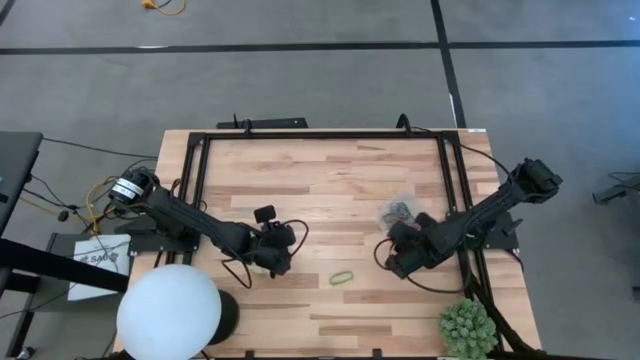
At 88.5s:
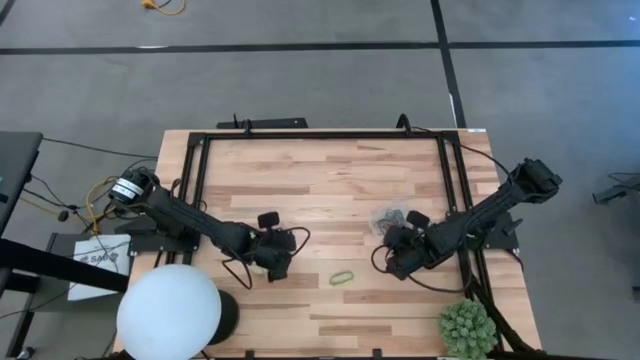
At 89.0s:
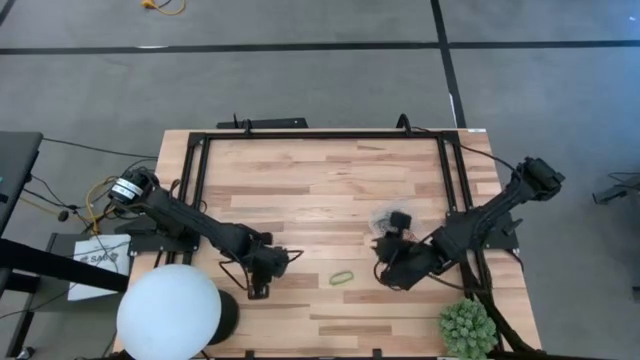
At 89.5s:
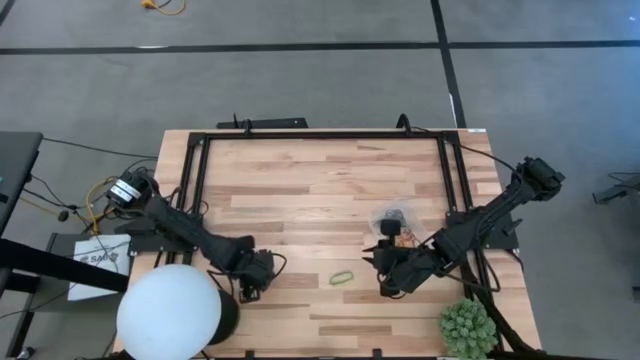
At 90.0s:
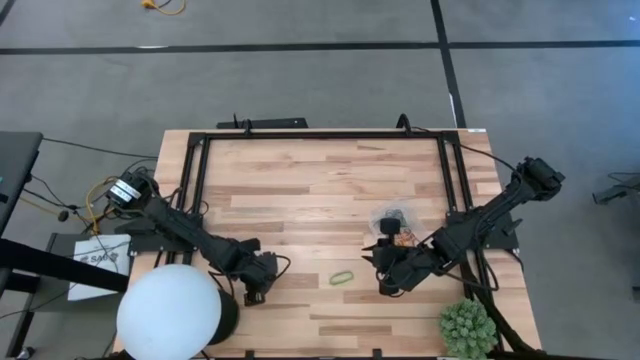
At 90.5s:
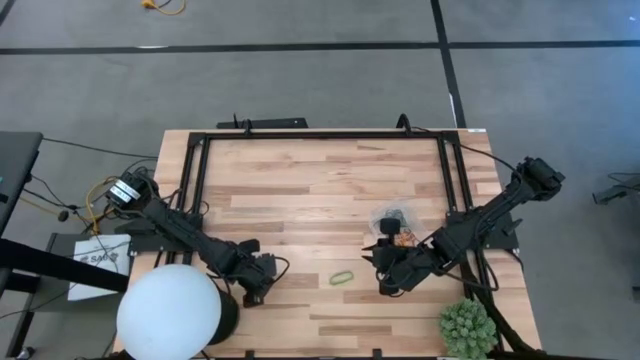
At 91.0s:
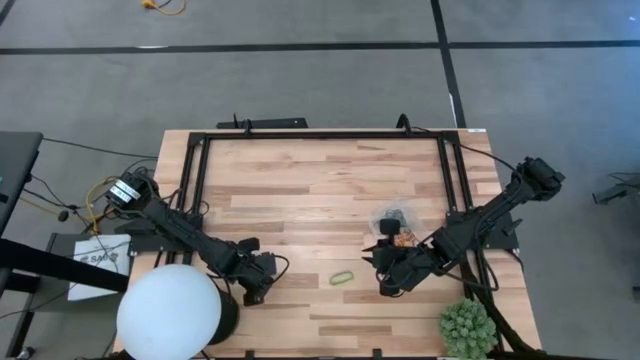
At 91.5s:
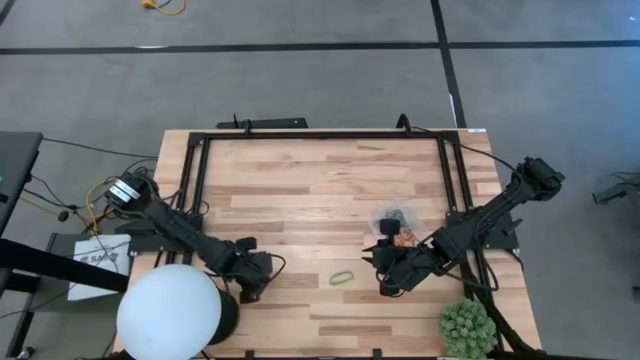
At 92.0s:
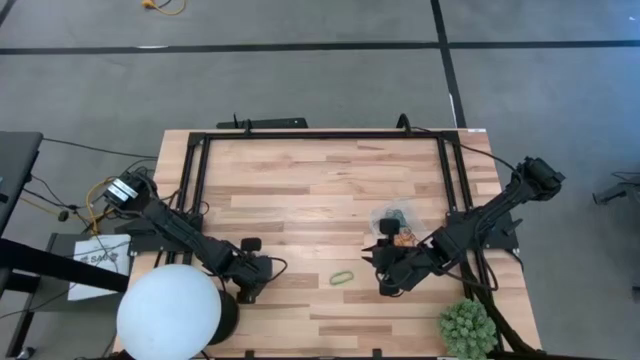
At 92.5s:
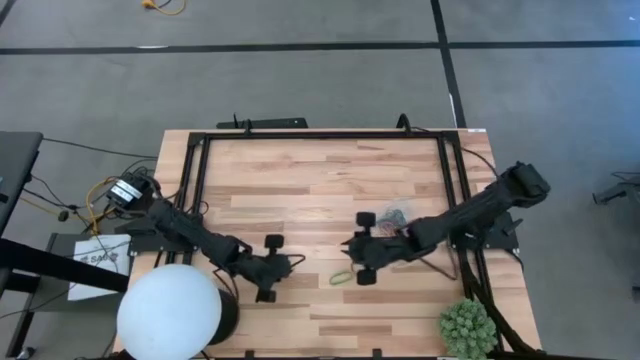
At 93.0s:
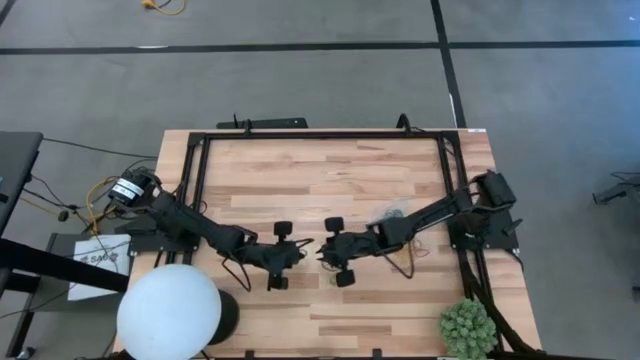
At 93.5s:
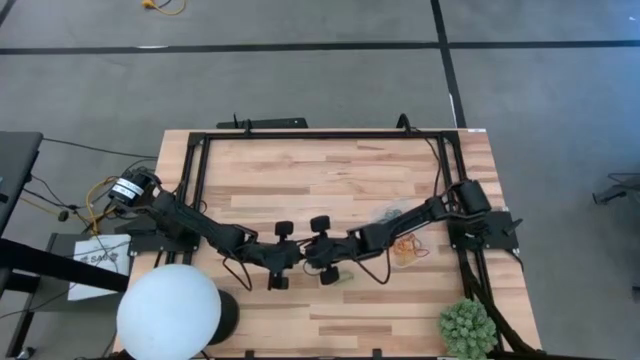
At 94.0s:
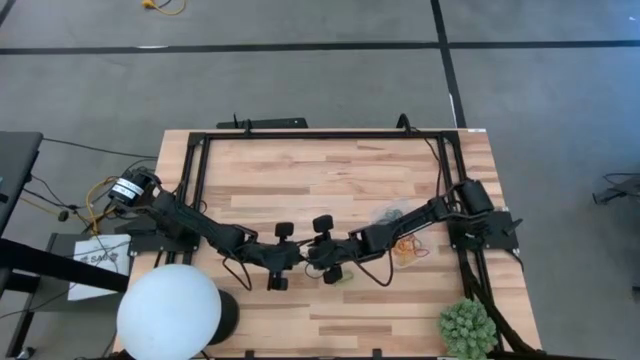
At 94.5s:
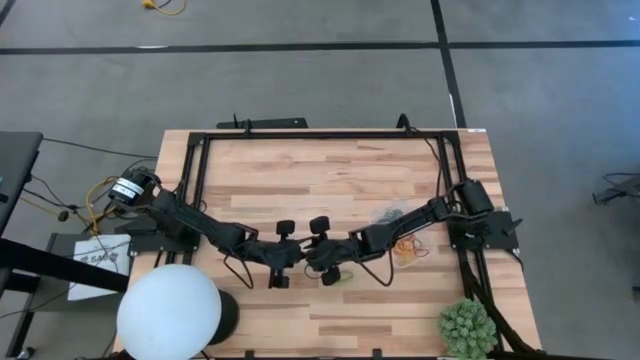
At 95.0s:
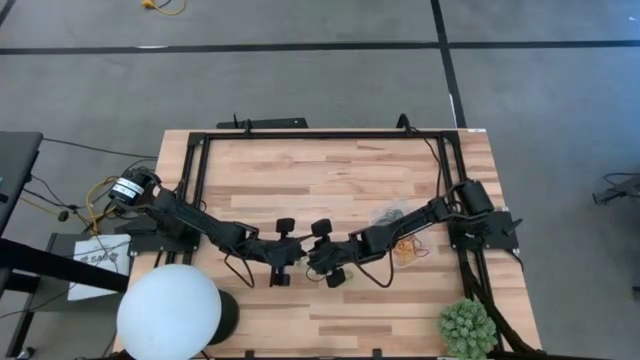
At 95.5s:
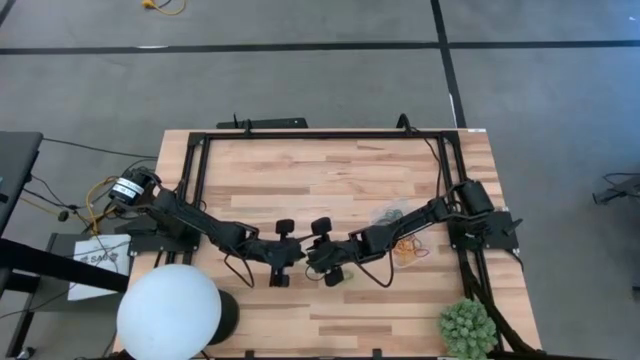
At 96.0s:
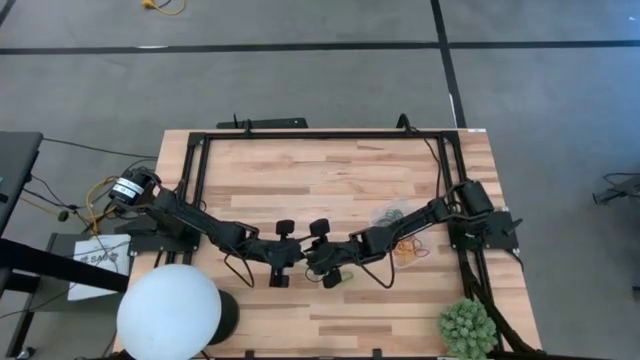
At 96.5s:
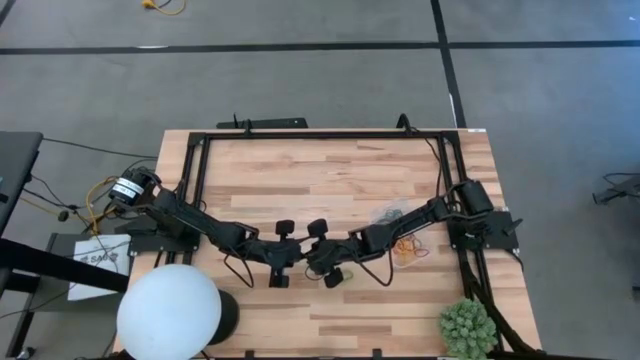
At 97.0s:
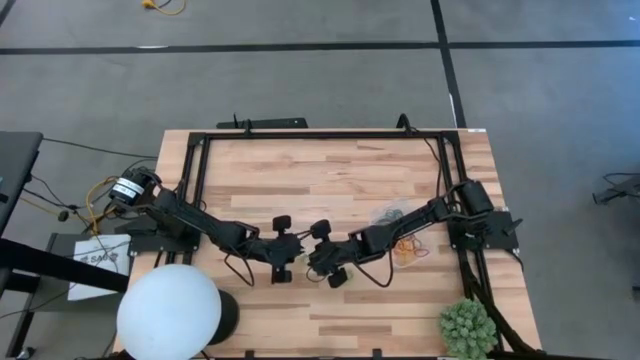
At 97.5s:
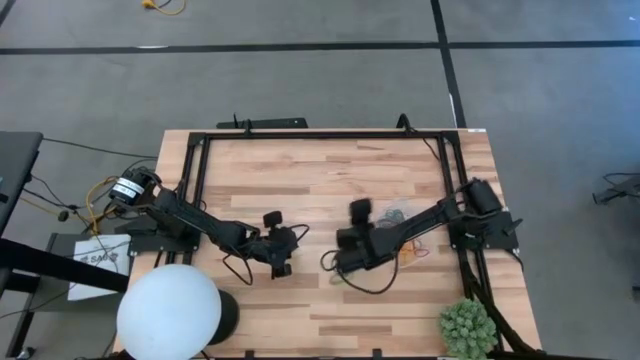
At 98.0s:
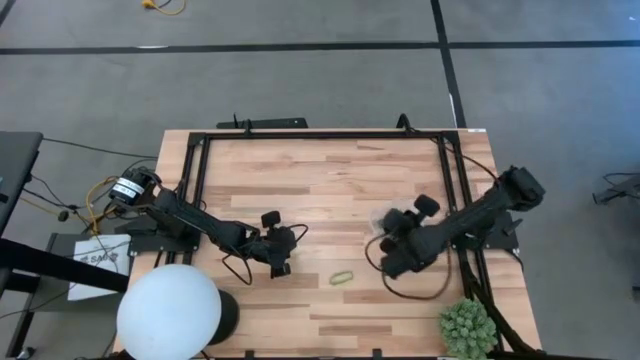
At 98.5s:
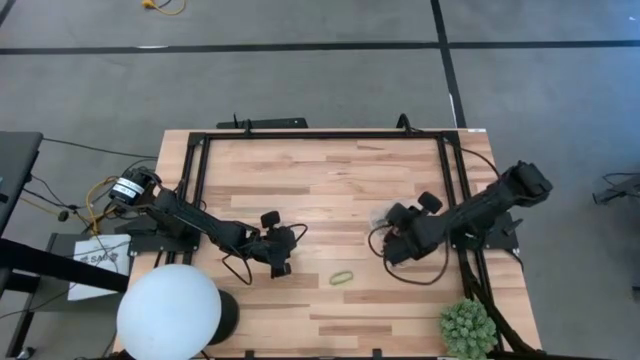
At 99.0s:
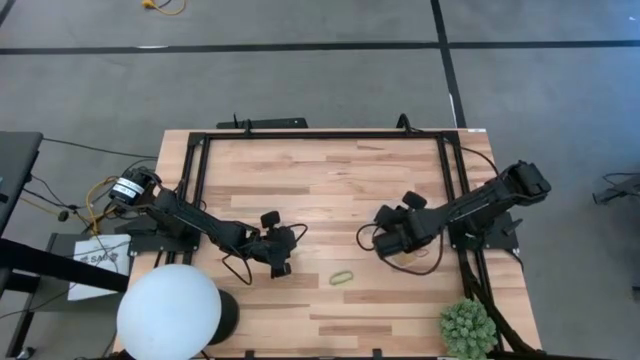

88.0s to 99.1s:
Task: Pick and place items into bin
Put the green rubber band into the transparent bin

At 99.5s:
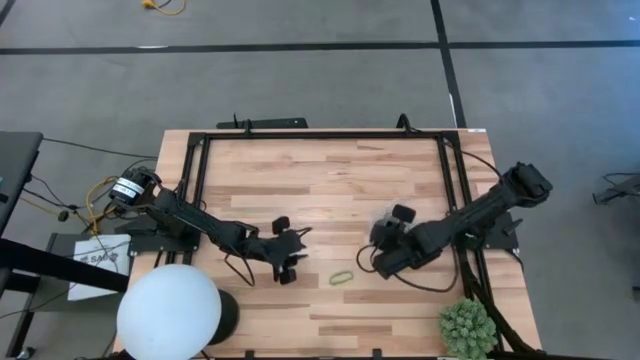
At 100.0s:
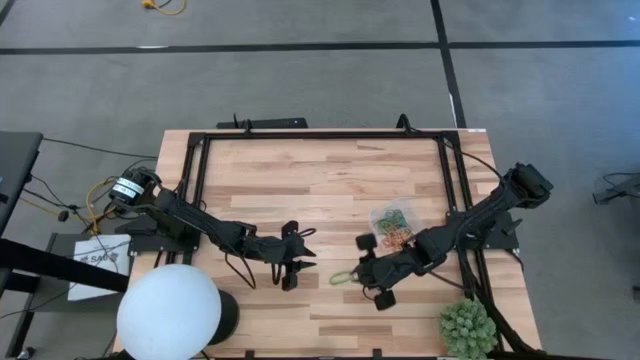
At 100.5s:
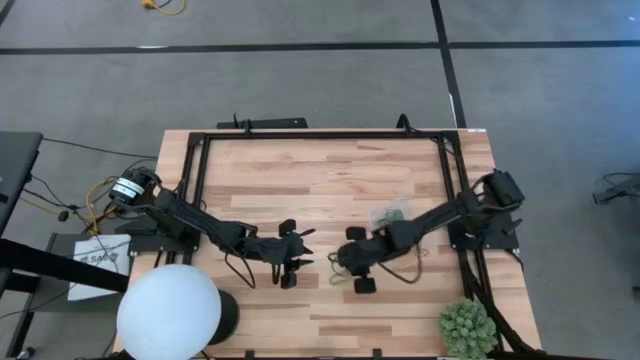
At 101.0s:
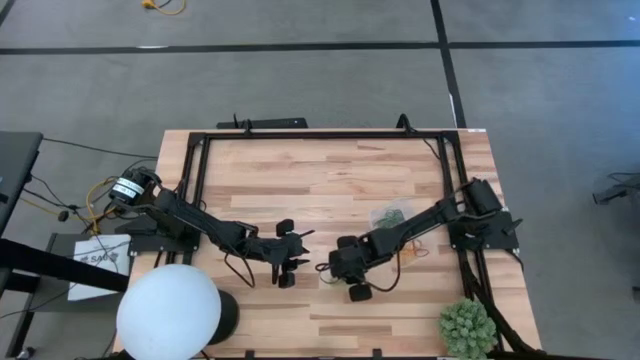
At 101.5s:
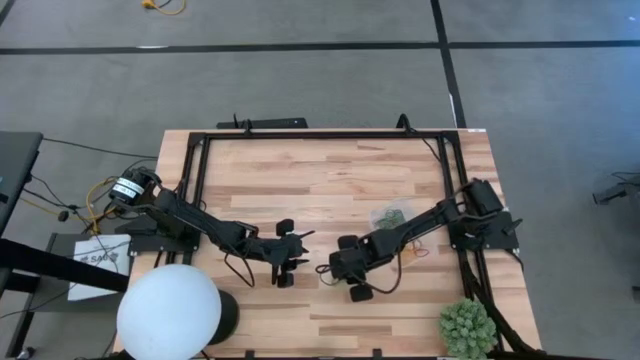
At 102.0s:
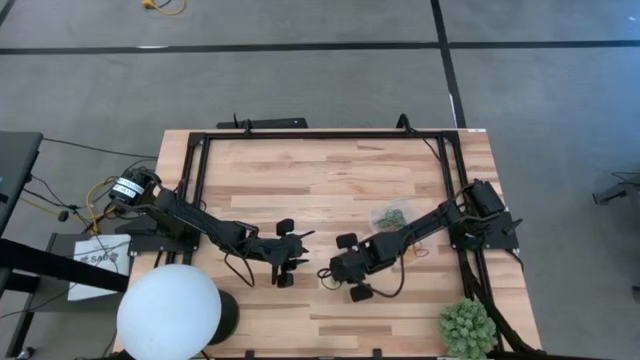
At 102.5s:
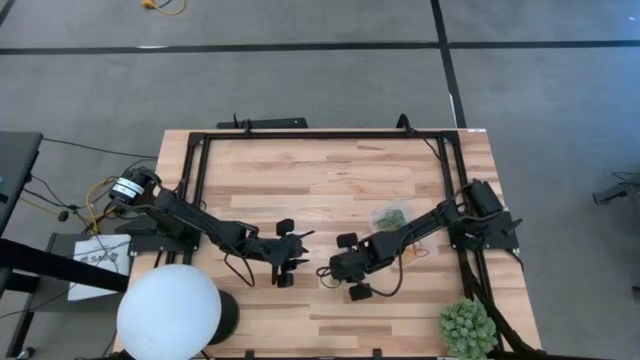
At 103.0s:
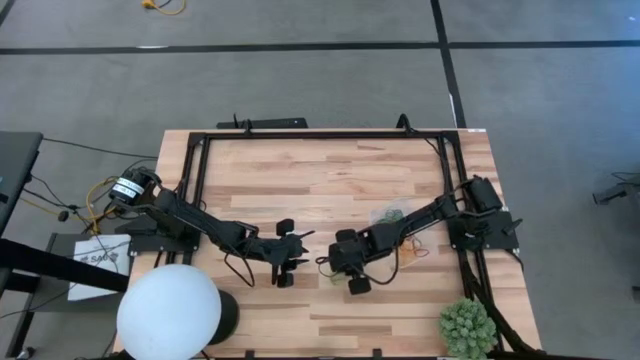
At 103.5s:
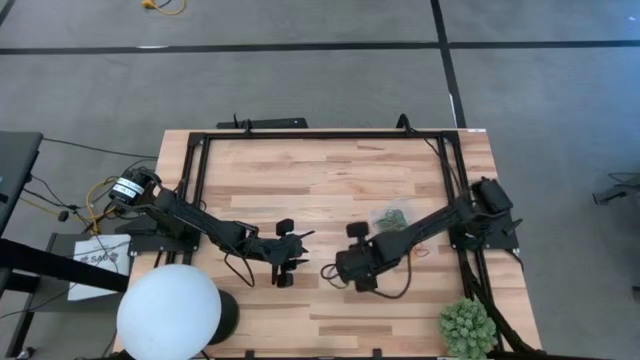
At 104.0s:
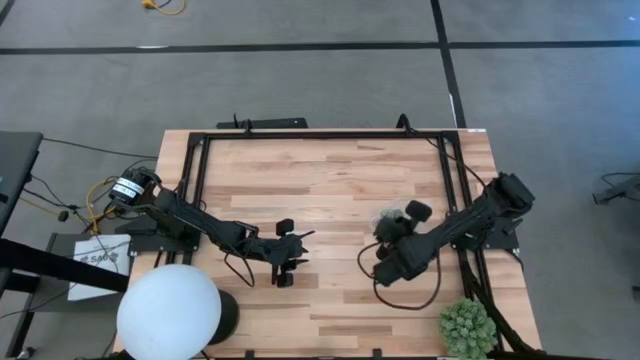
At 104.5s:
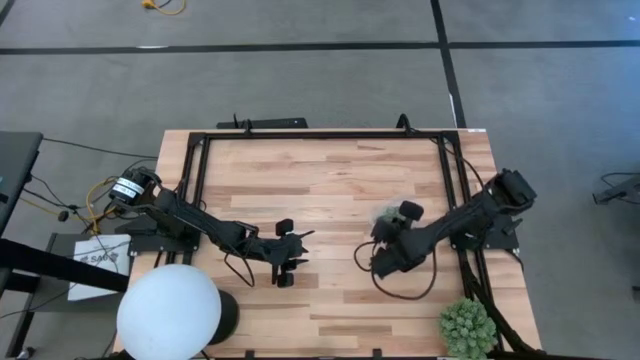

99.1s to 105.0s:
Put the green rubber band into the transparent bin

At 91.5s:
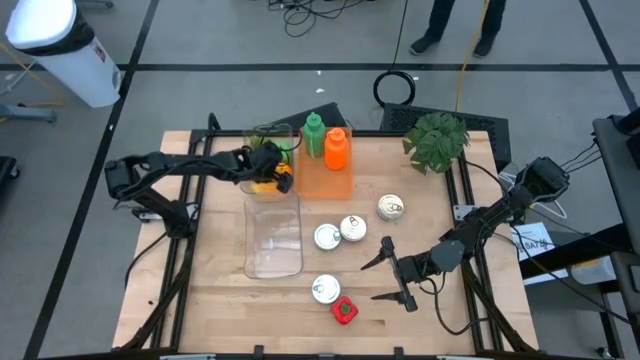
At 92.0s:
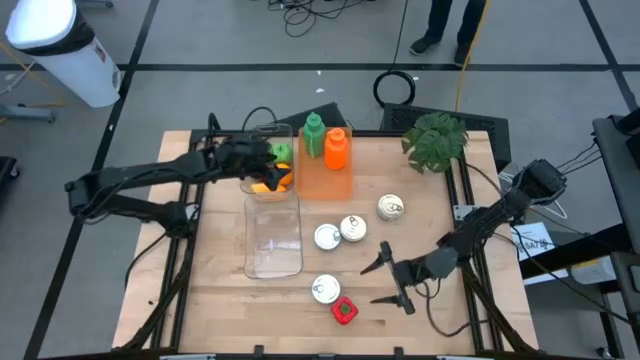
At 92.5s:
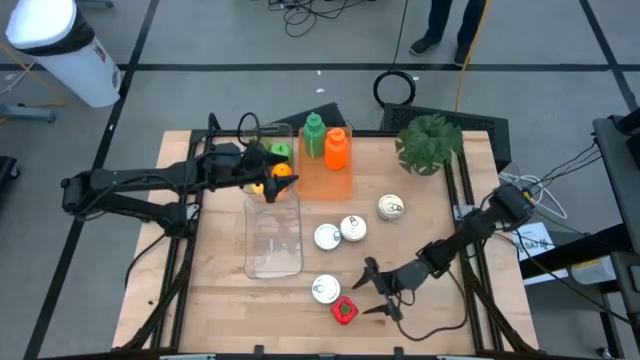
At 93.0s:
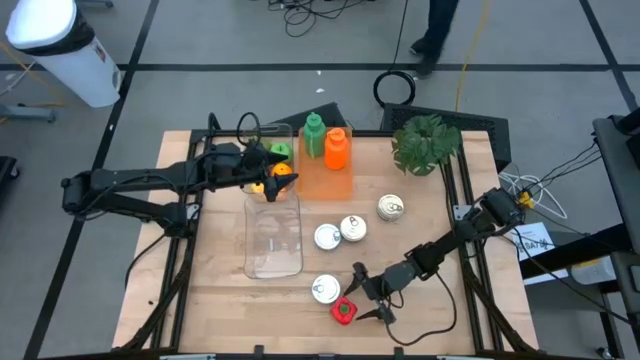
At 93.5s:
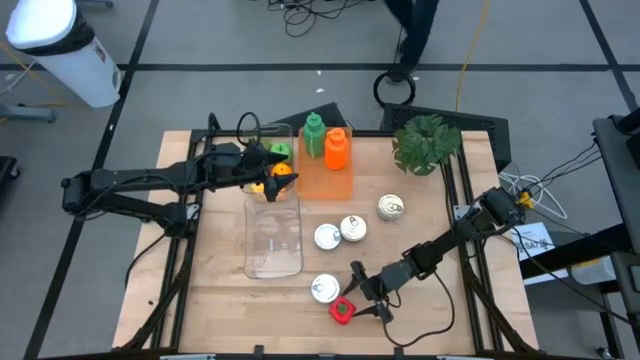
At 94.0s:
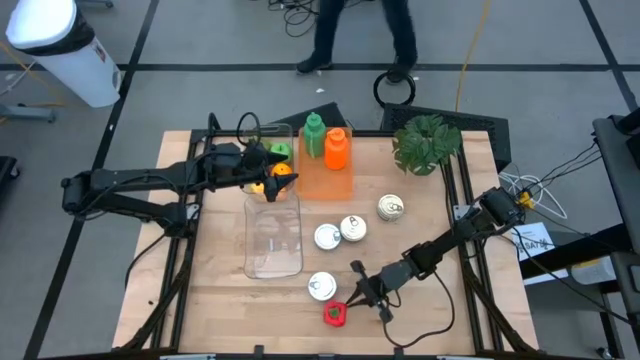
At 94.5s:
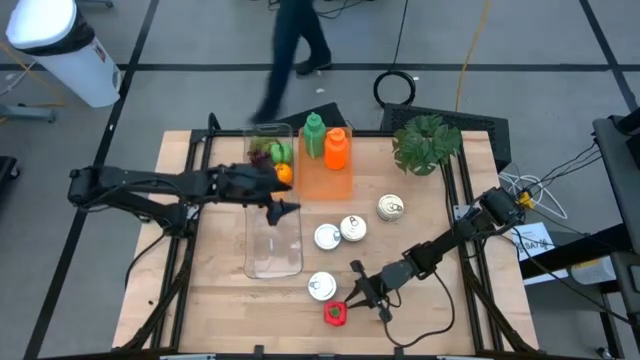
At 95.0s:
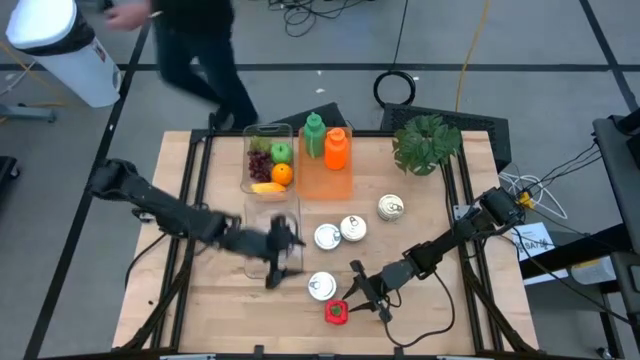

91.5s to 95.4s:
Task: Pick & Place Food Item
Put the red bell pepper into the top transparent bin
